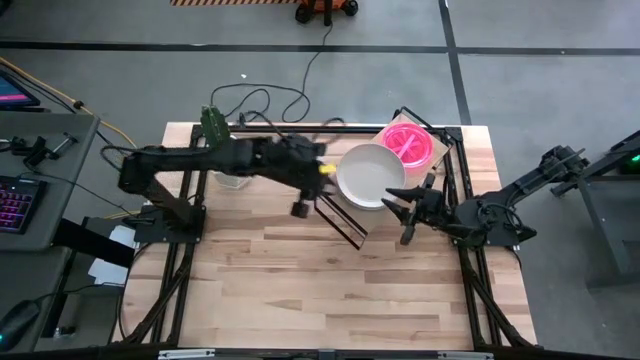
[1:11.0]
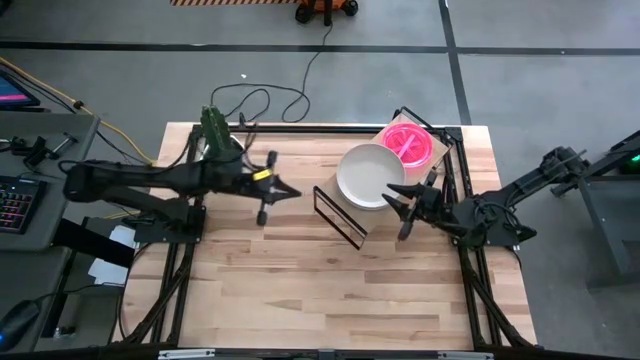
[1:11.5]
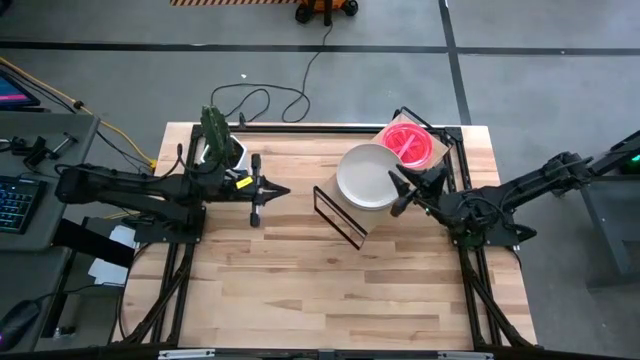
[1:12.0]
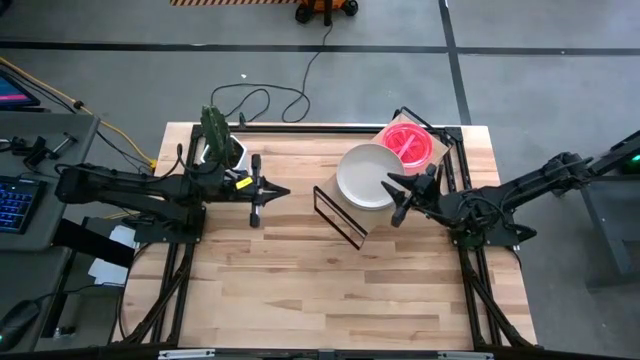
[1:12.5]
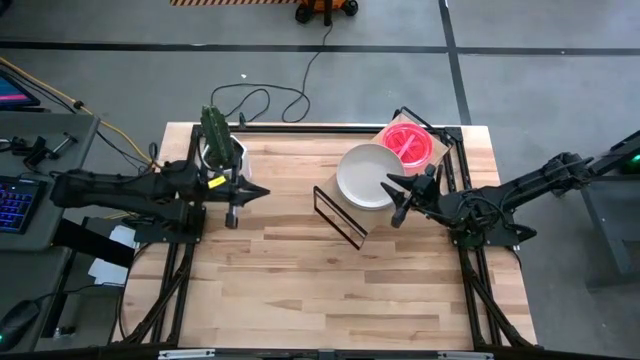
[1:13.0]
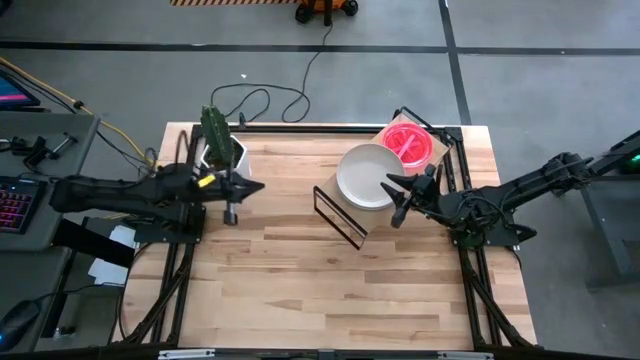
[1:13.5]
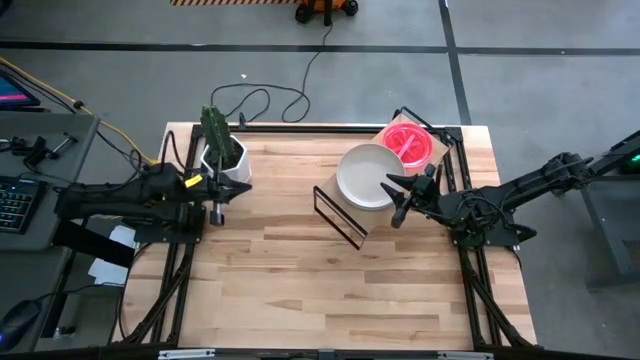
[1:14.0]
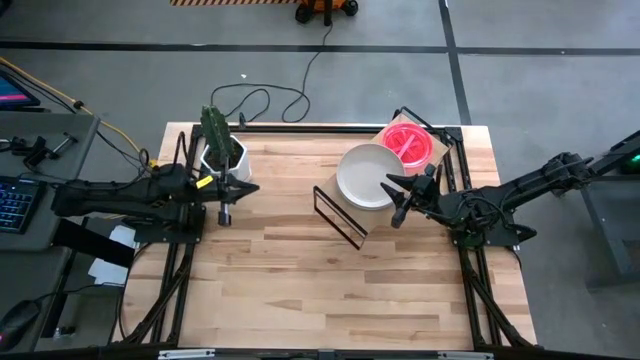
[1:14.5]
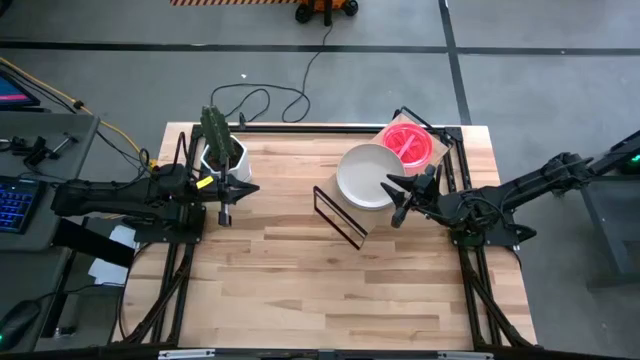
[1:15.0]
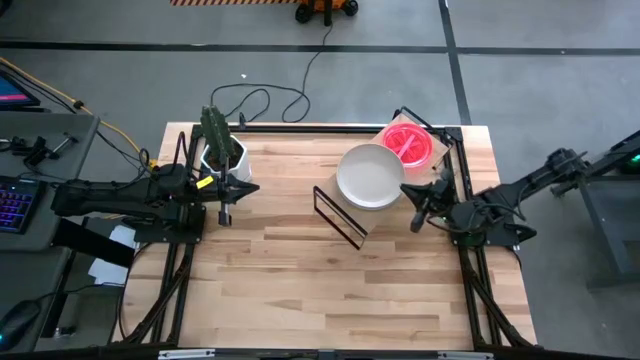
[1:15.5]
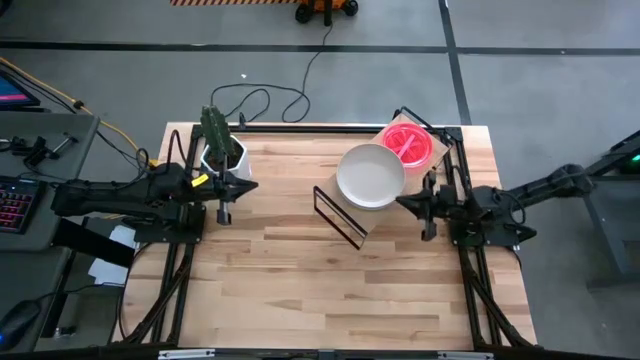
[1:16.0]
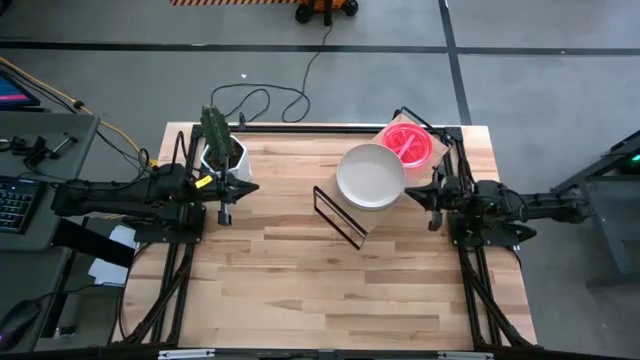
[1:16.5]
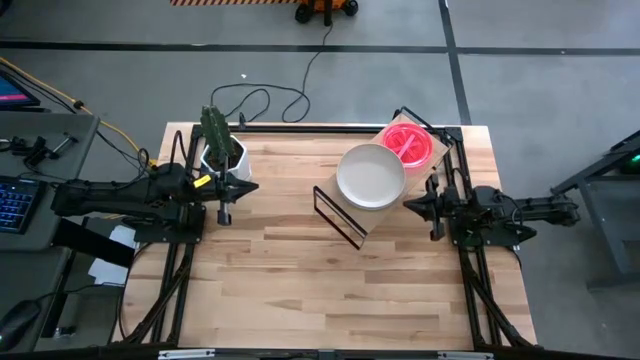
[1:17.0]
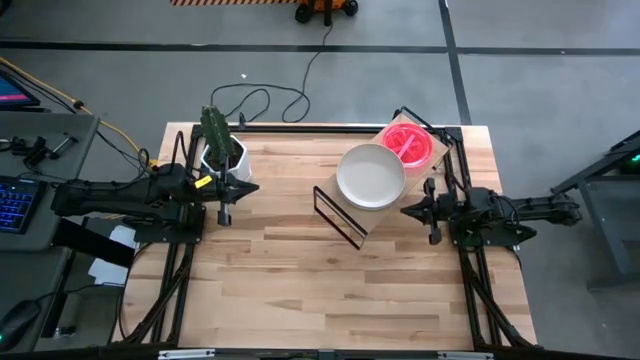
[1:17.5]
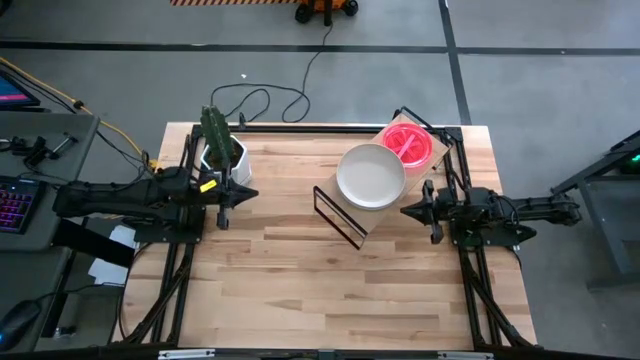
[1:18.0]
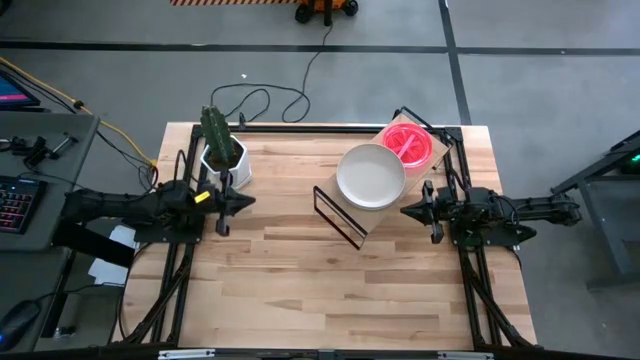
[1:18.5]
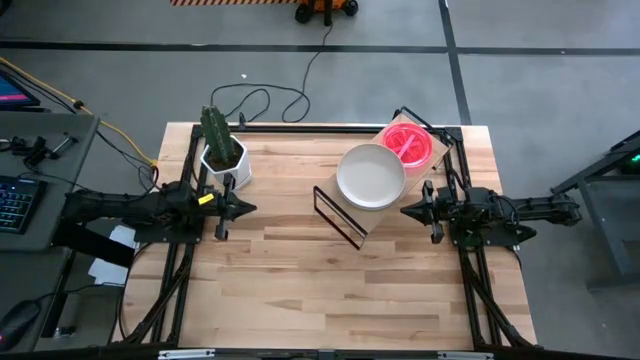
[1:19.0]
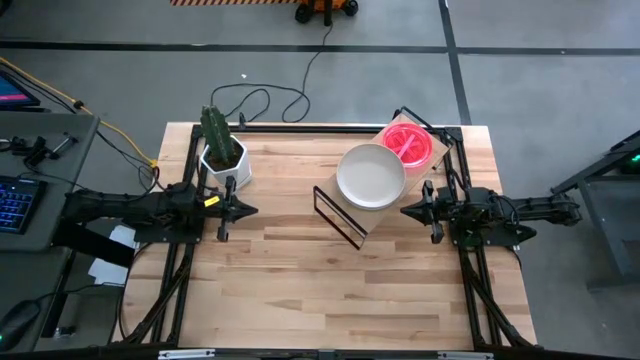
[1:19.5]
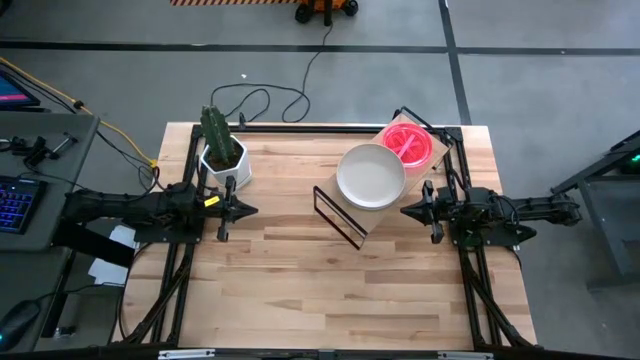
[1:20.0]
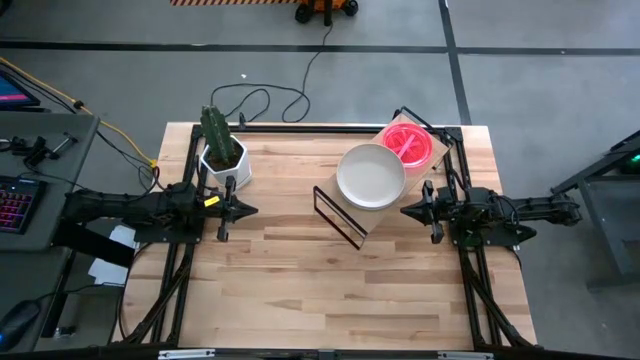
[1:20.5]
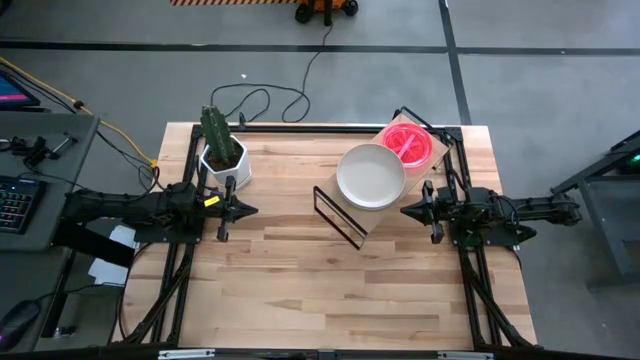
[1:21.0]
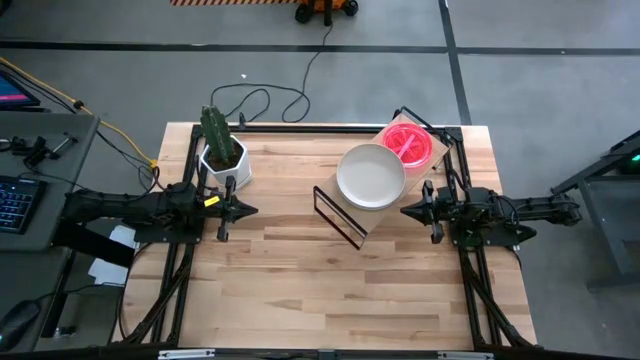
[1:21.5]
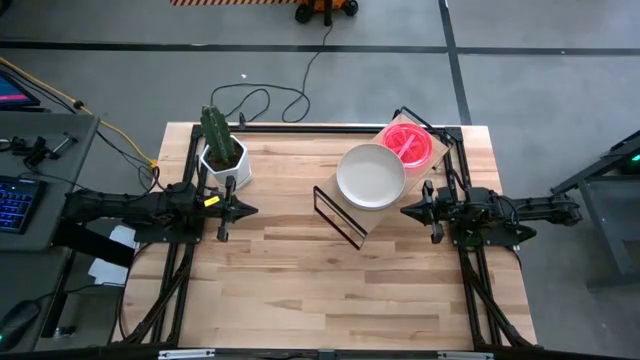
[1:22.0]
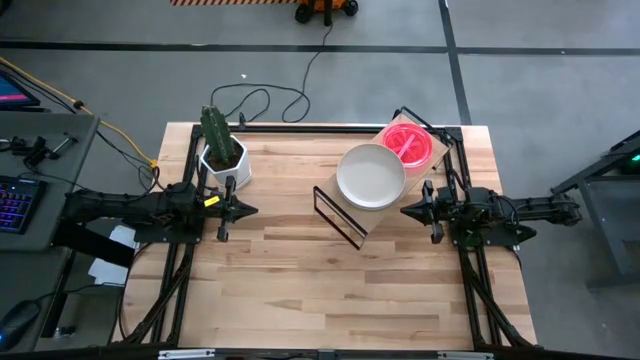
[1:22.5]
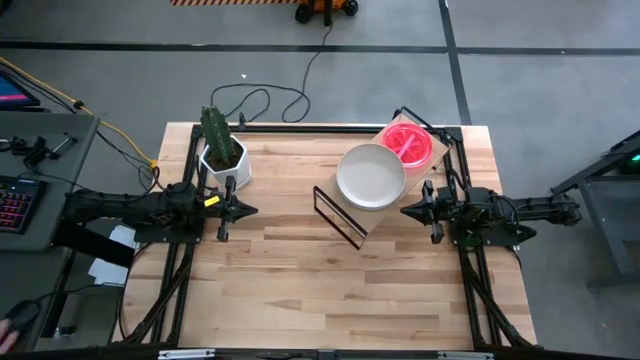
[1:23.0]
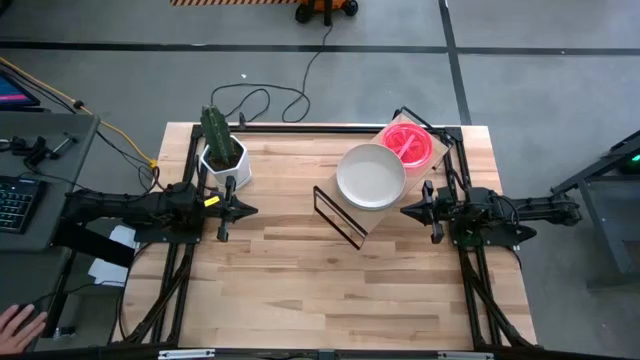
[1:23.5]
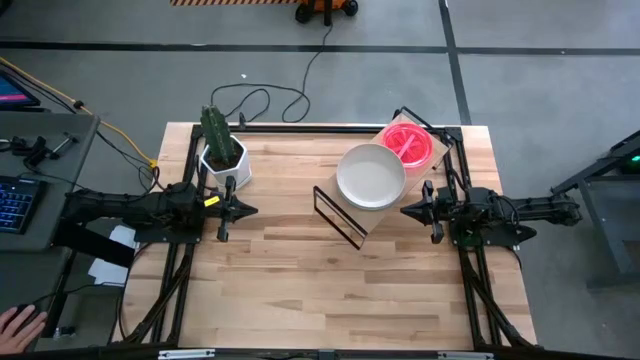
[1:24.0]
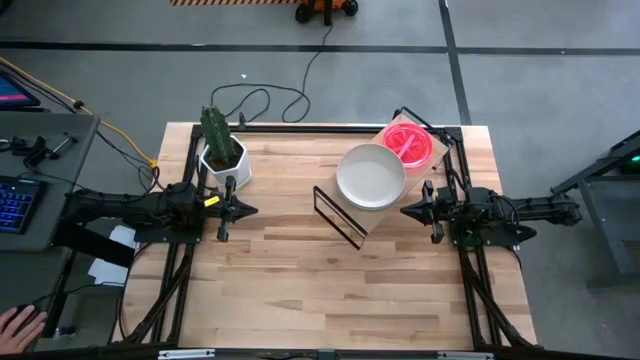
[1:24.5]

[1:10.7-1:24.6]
Task: Place and stack plates onto a shelf
Return to Home Position

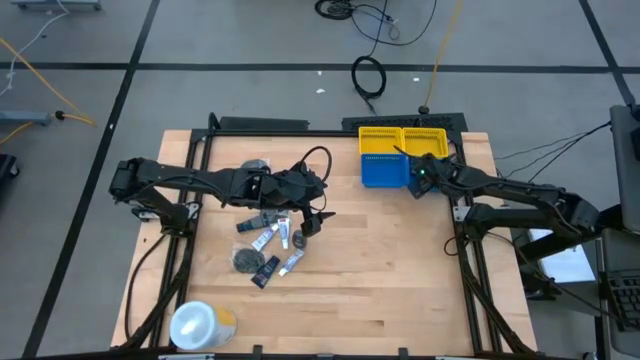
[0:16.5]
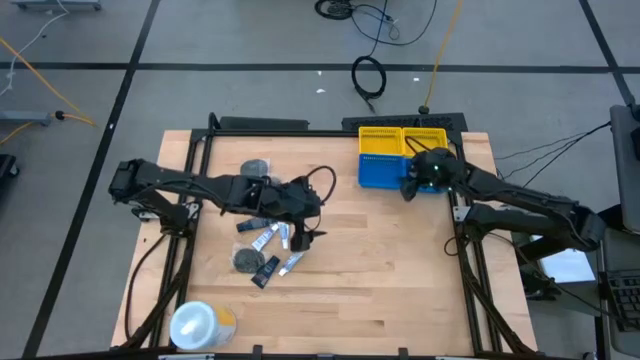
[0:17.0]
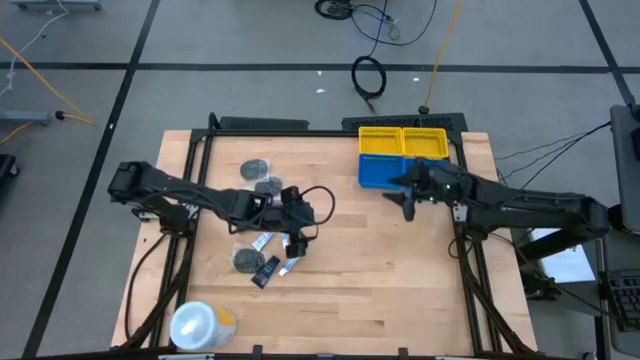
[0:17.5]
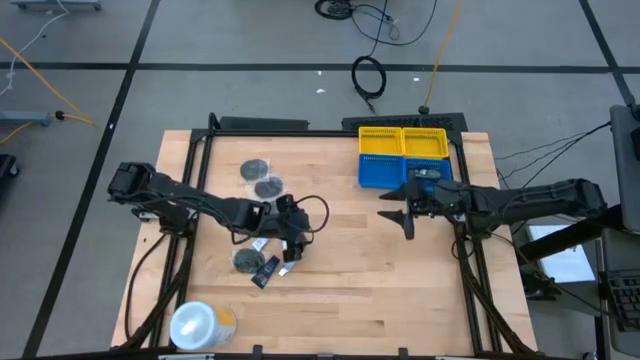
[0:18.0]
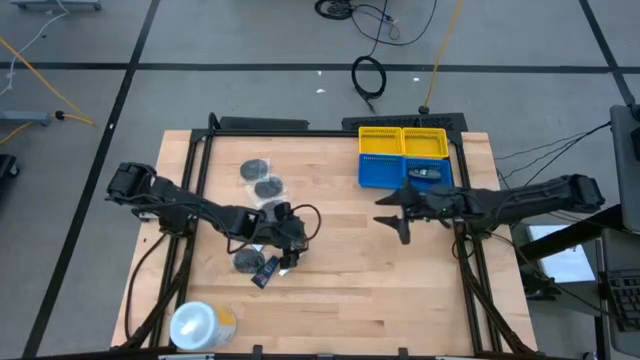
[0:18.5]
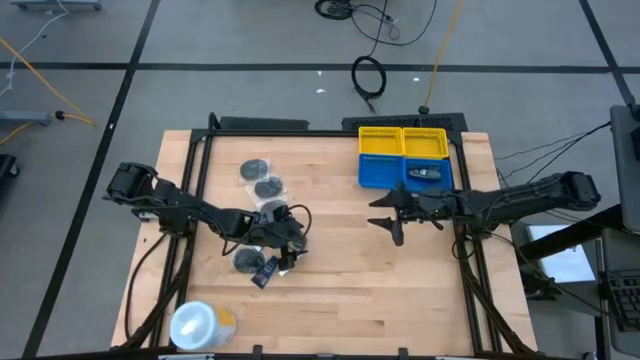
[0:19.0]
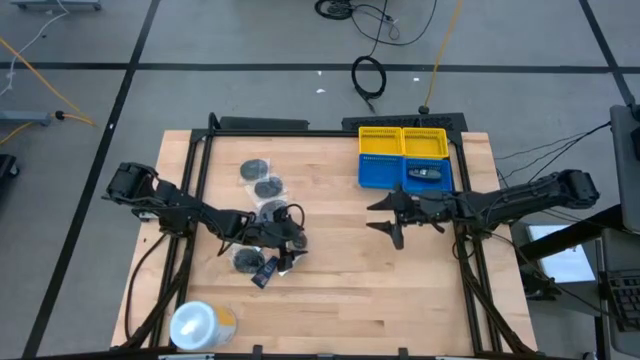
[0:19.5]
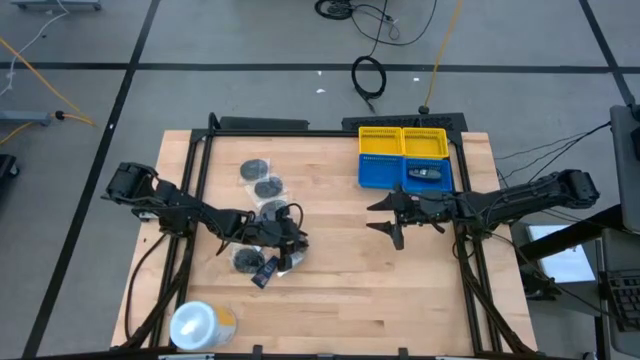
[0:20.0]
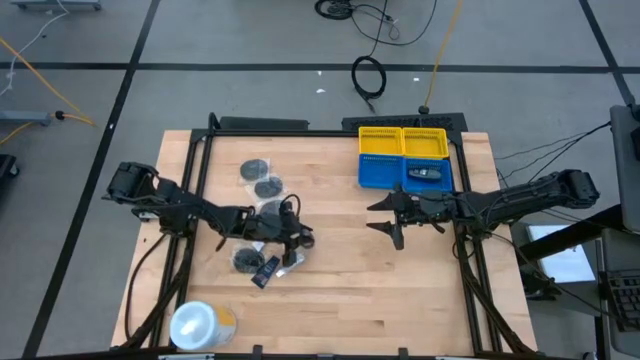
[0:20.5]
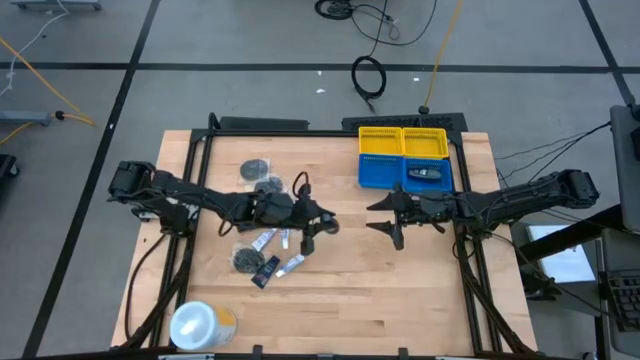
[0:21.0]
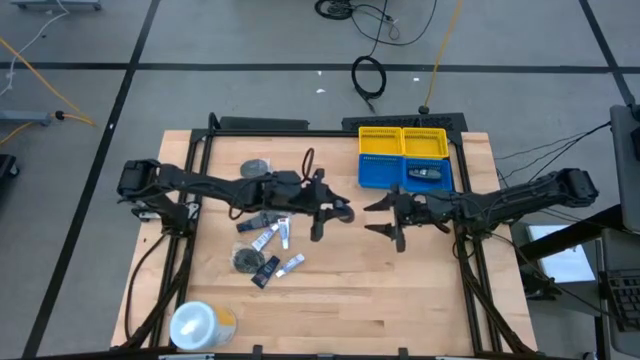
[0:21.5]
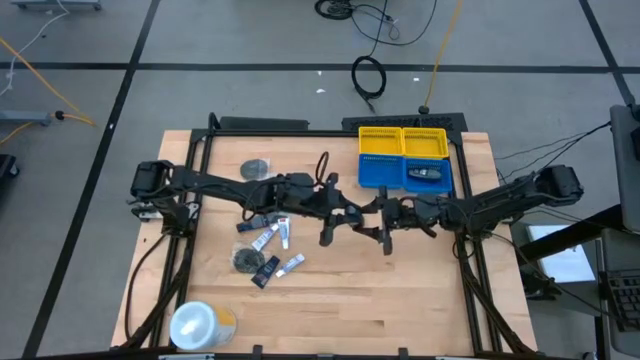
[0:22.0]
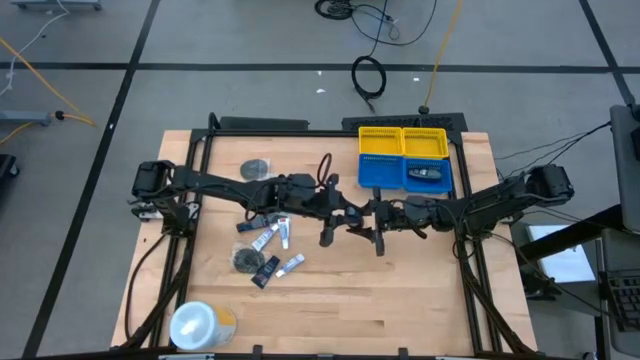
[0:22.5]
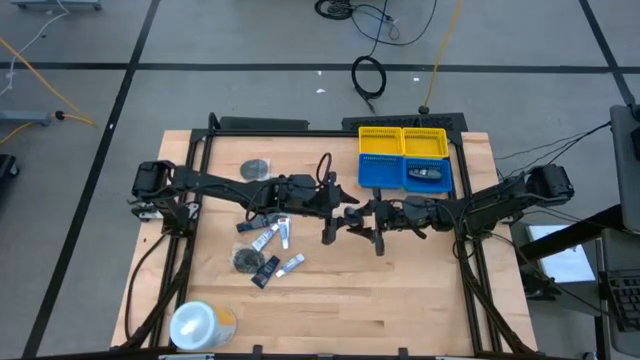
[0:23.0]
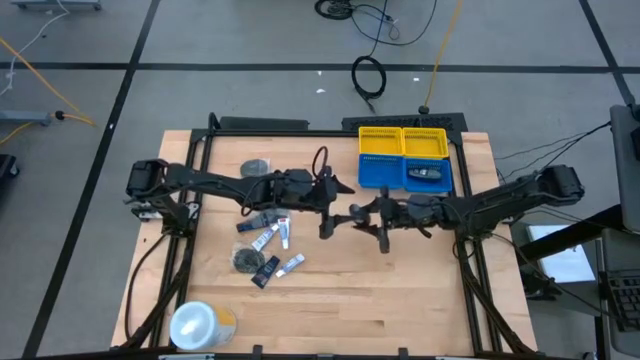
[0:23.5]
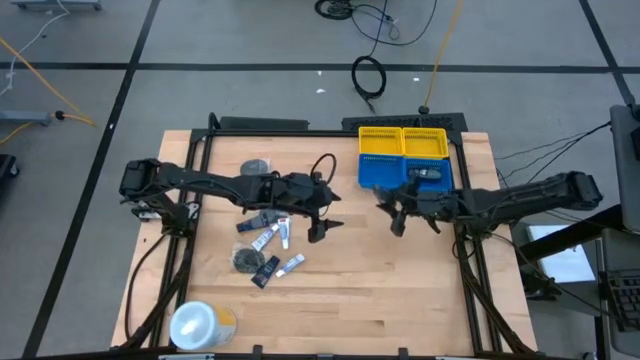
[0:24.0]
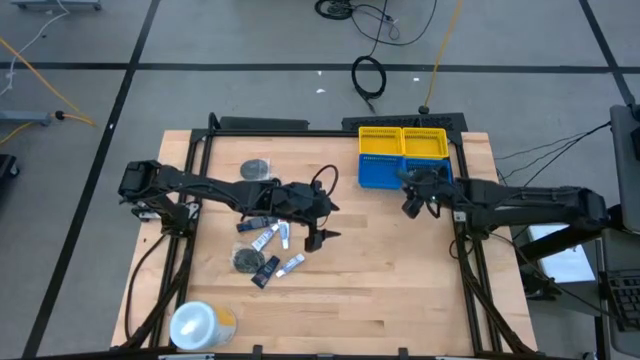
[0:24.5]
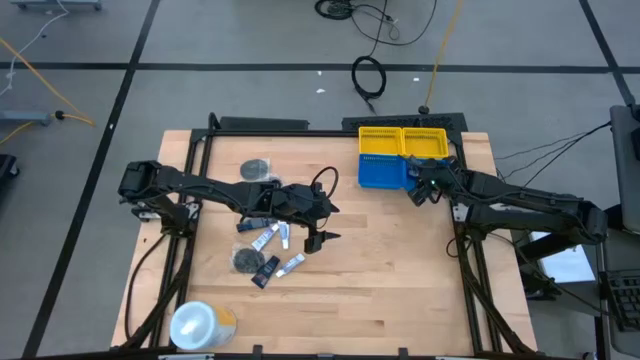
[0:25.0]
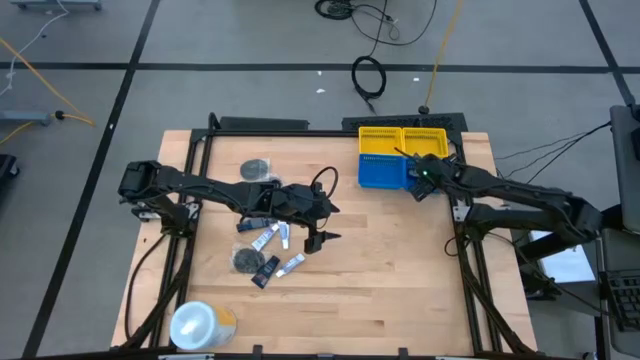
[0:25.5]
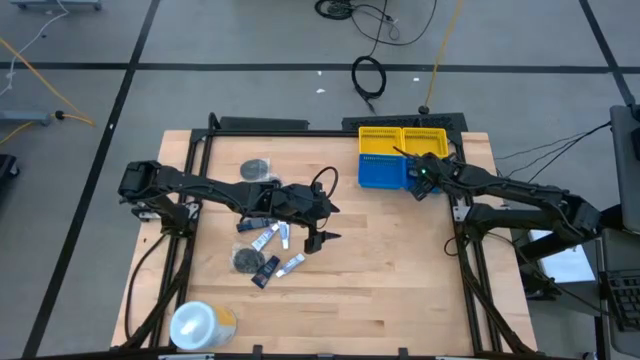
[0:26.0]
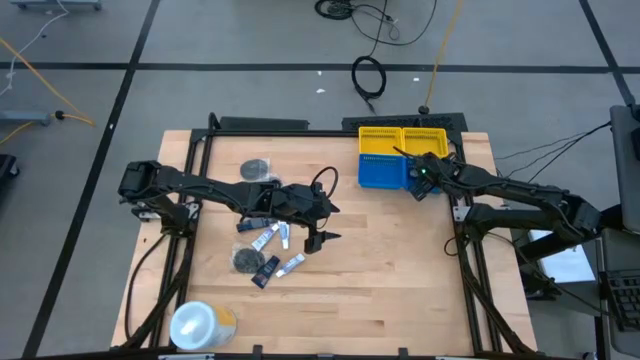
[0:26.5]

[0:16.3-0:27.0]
Task: Pick & Place Travel size toiletries
Put the gray deodorant into the right blue basket
